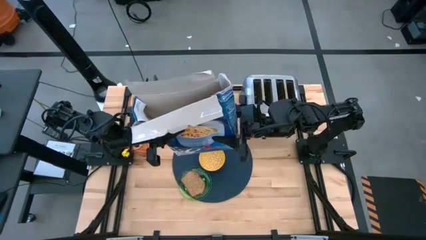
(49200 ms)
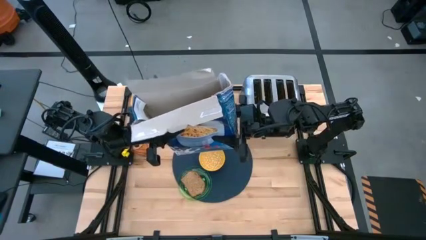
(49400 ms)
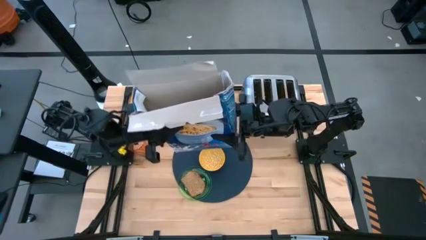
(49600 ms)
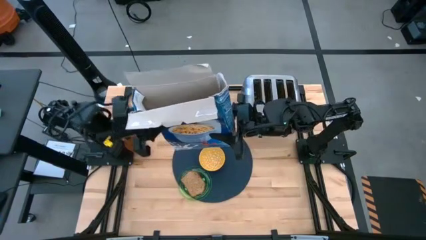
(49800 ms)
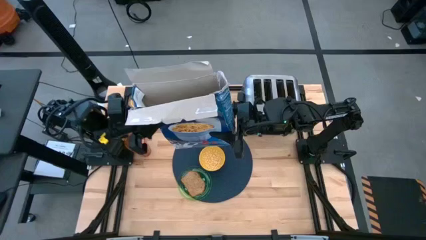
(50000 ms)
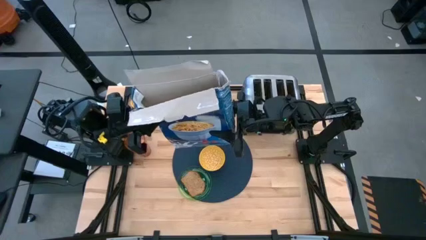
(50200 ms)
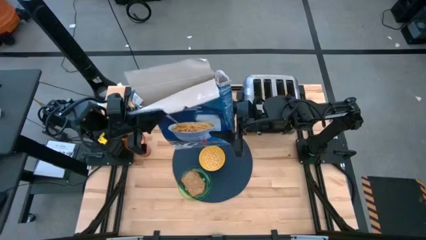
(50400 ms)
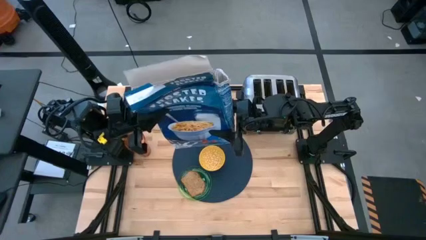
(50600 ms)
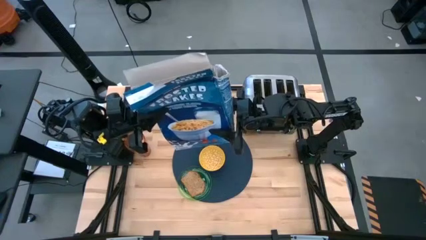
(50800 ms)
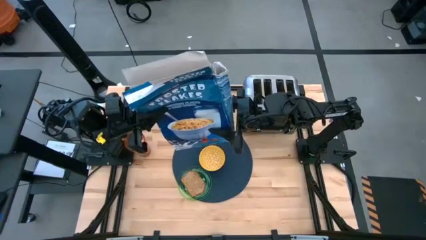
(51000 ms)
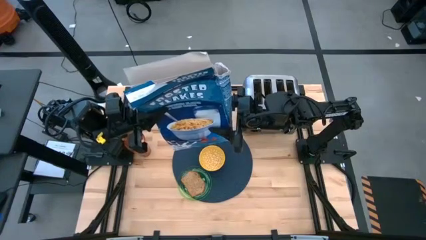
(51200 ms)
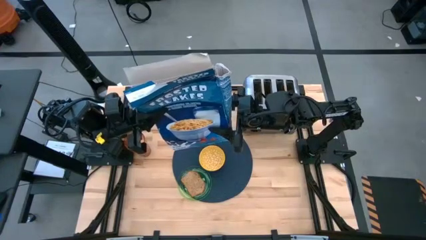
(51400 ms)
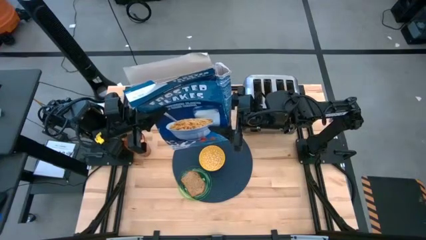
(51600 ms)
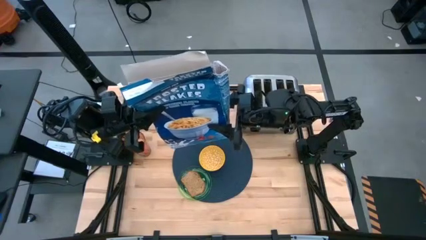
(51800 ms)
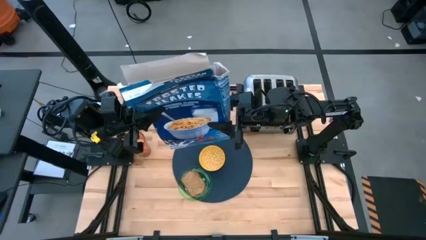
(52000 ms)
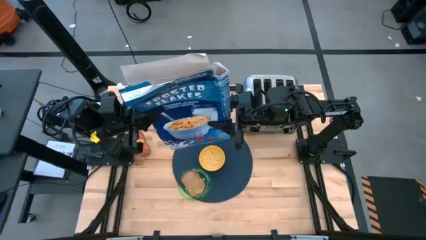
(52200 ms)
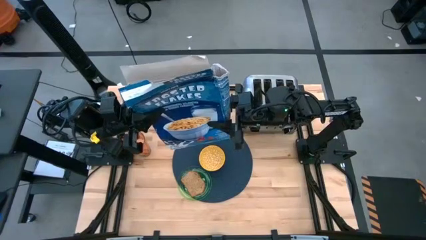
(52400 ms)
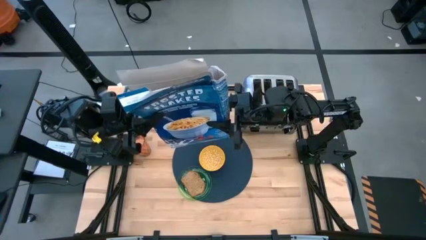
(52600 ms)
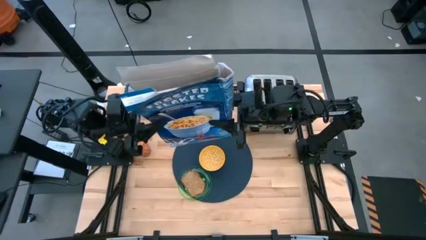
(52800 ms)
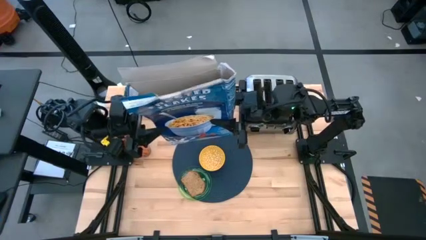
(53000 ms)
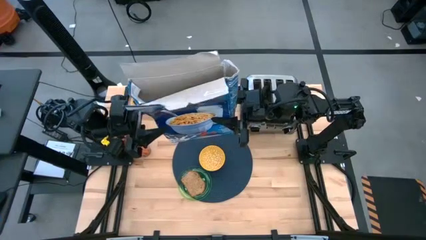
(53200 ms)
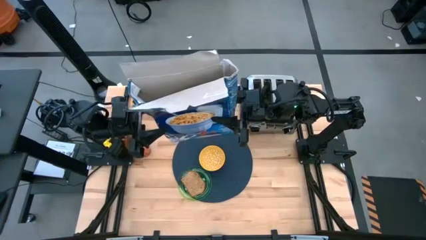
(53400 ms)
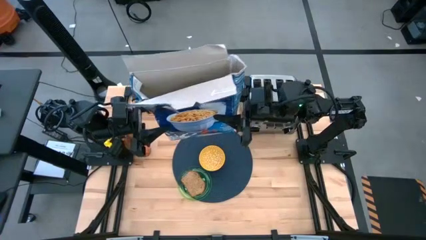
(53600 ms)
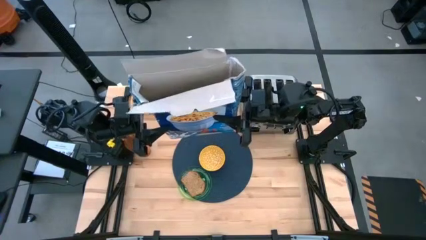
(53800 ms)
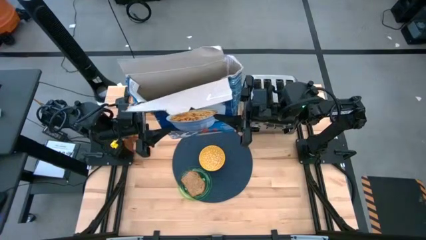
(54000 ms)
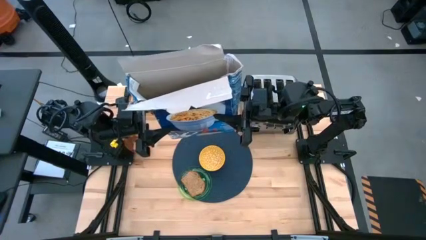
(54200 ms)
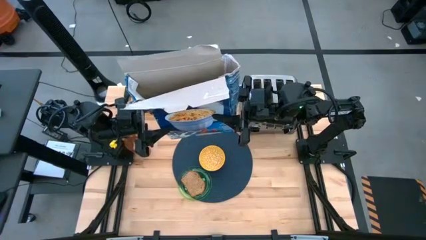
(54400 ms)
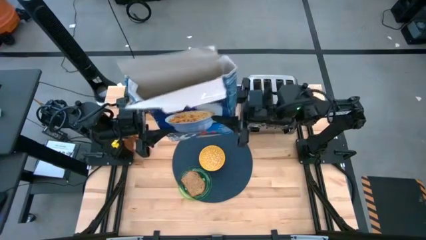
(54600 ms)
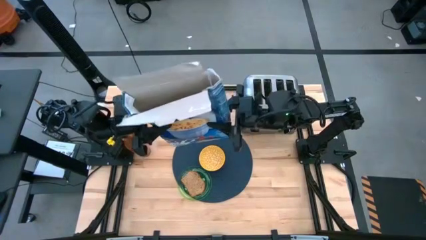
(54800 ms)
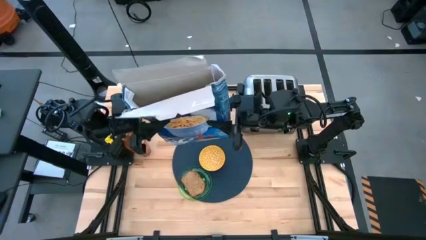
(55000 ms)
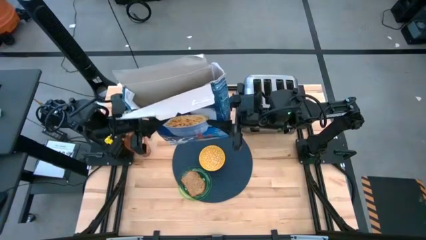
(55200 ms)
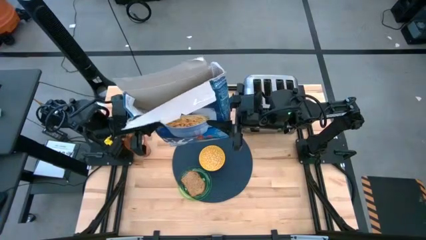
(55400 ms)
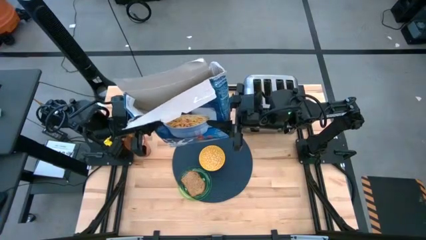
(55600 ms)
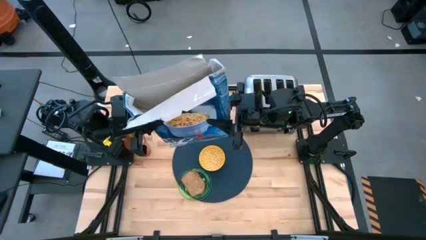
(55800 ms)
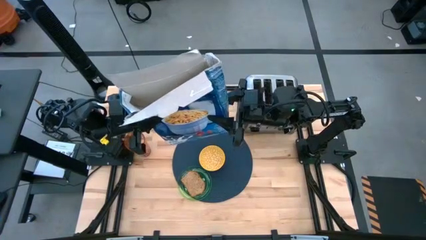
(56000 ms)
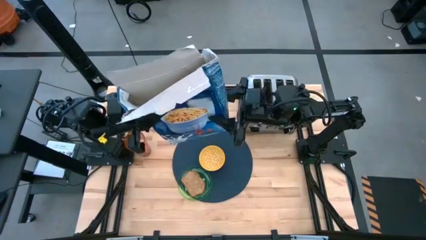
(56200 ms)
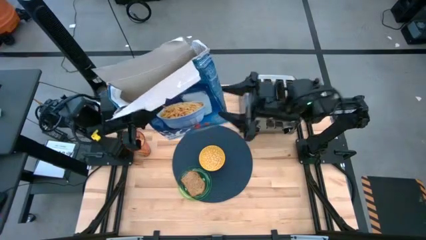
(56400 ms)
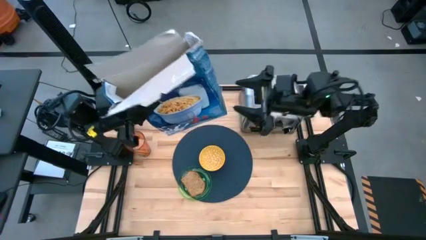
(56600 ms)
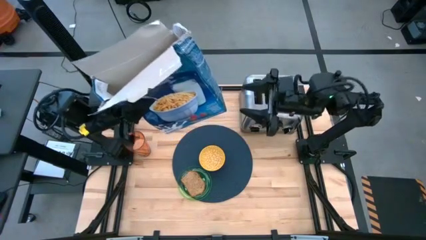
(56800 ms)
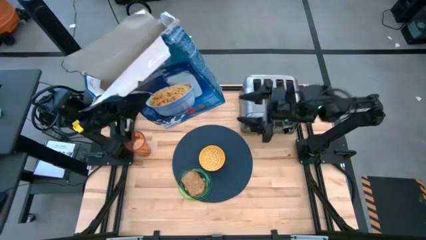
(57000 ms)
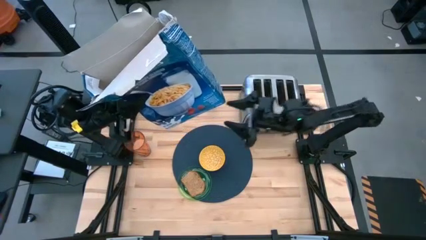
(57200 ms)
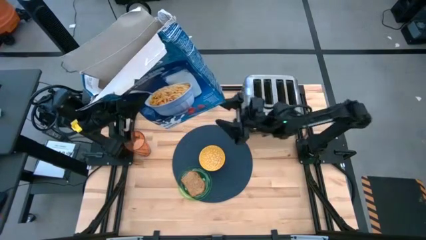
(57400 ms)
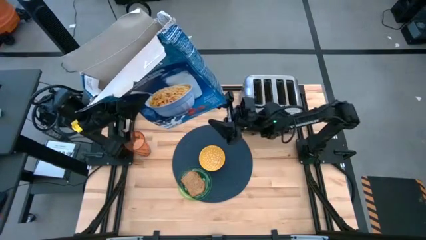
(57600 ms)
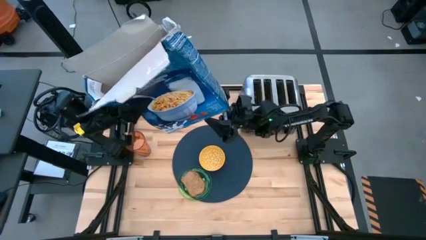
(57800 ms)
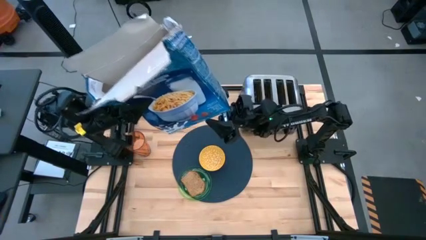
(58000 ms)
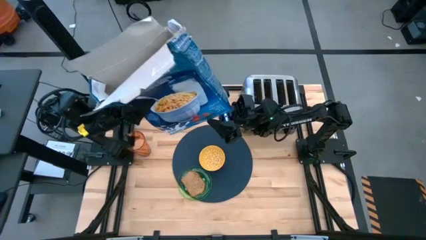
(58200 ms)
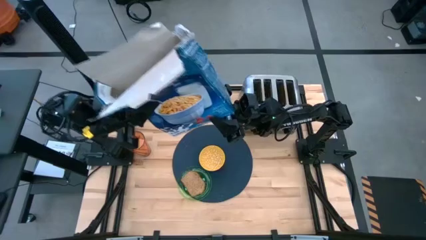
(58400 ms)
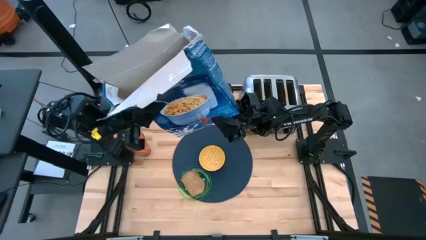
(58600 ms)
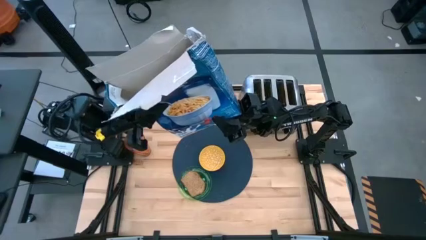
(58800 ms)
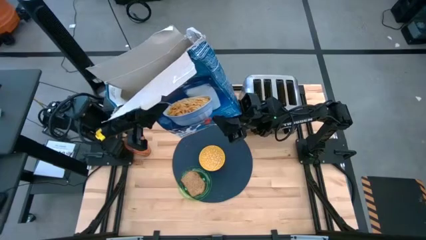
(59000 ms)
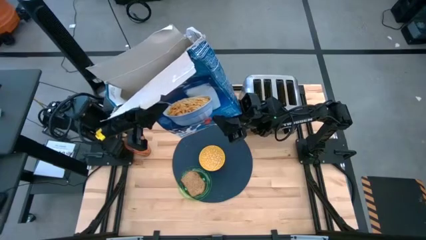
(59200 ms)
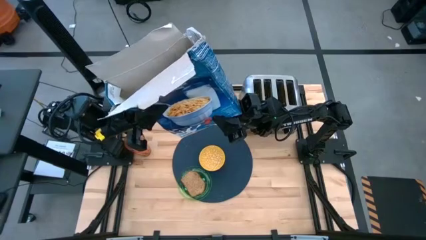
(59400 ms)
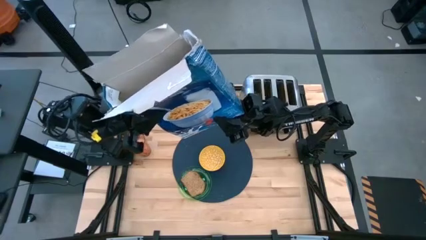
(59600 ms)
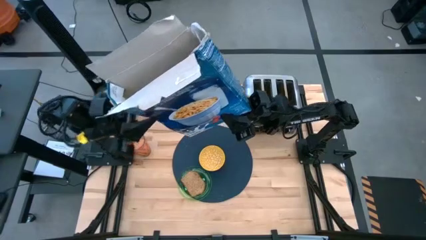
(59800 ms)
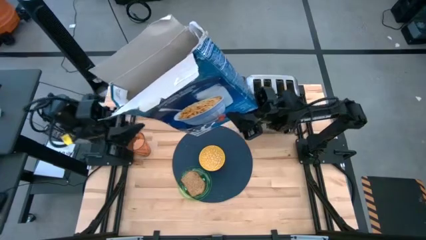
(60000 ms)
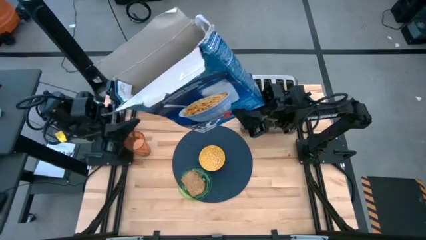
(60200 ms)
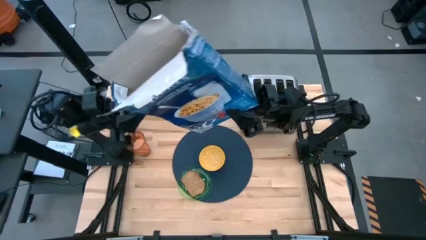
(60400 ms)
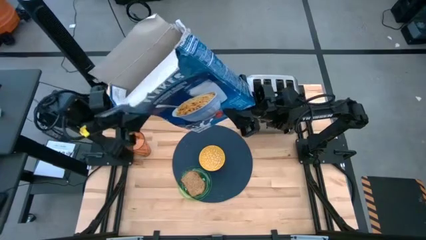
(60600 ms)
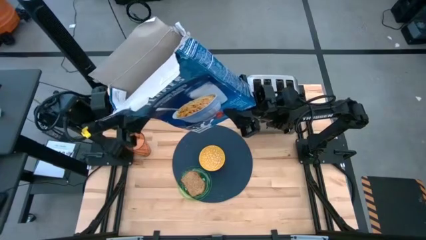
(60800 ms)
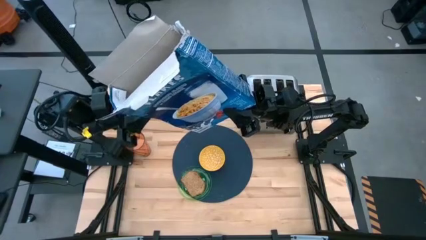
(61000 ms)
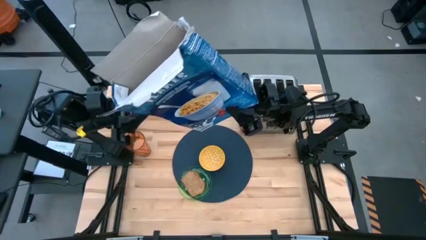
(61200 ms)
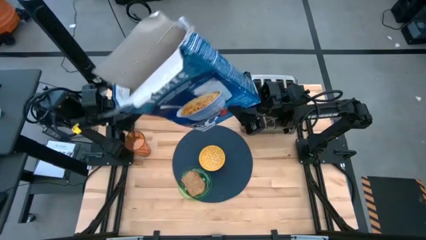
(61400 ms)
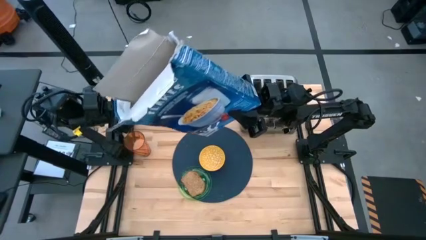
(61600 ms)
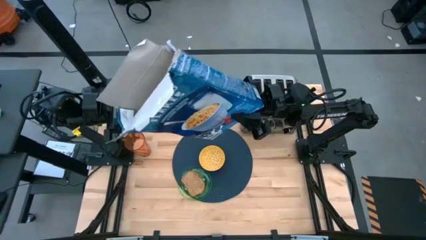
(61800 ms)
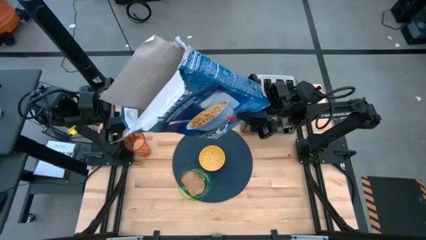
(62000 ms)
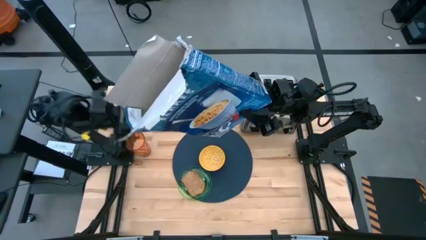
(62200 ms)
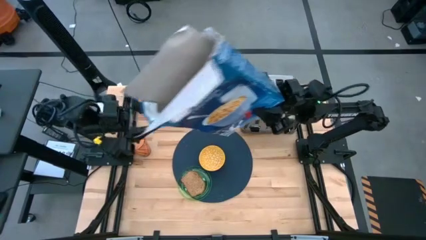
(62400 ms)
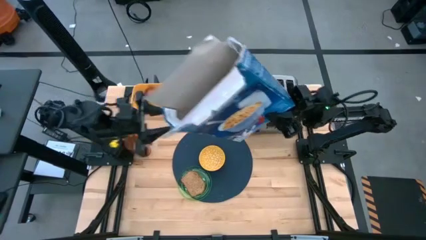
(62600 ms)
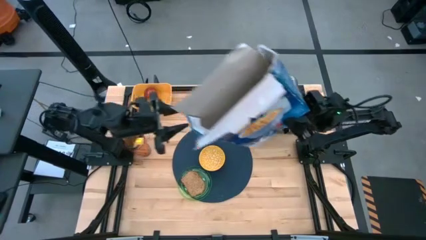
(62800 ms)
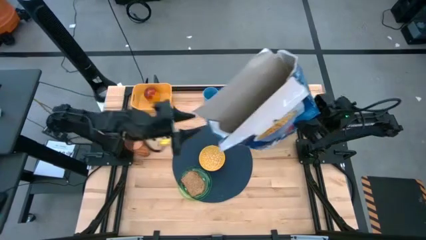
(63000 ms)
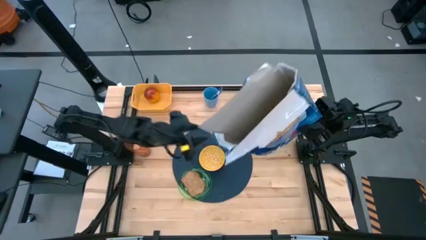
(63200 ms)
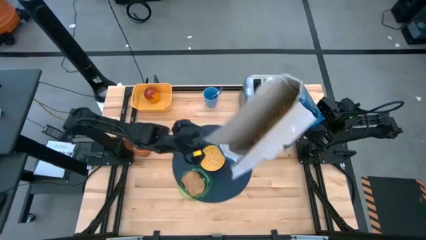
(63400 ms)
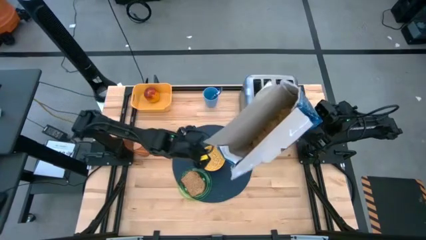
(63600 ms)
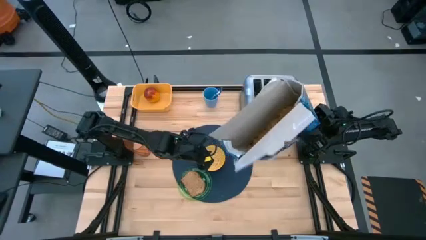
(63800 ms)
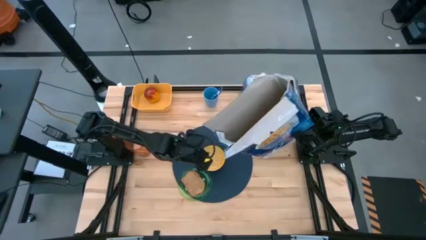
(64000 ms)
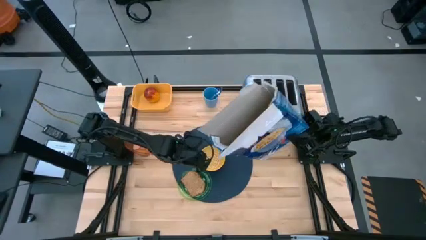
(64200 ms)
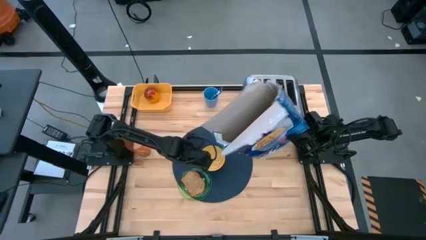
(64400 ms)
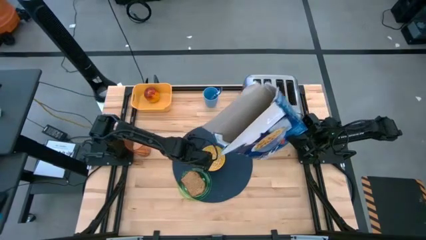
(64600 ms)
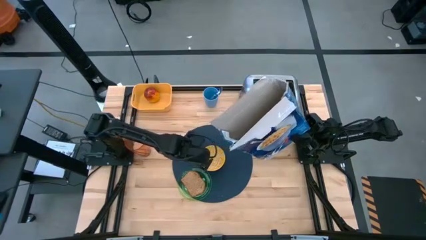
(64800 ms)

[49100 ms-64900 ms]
Task: Arrange a breakfast setting
Pour the cereal in the yellow bowl on the dark blue table mat
